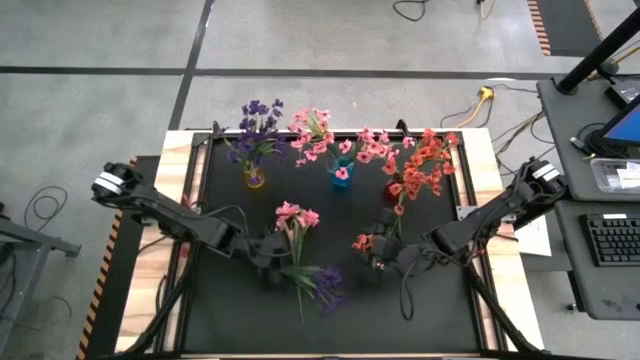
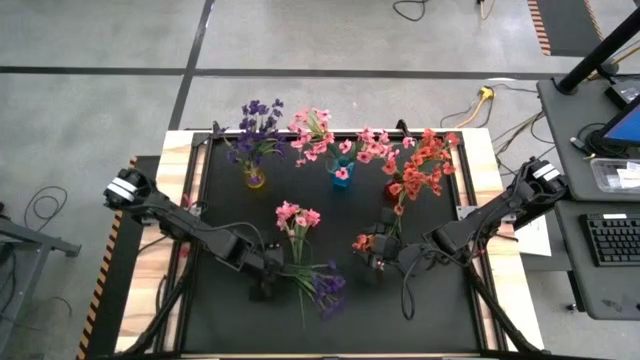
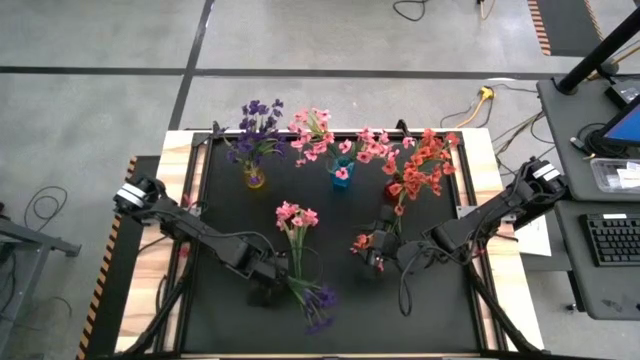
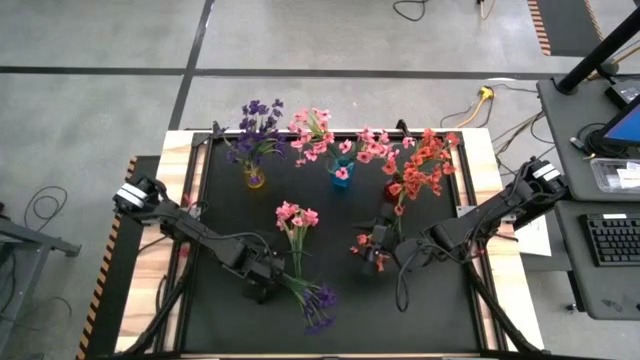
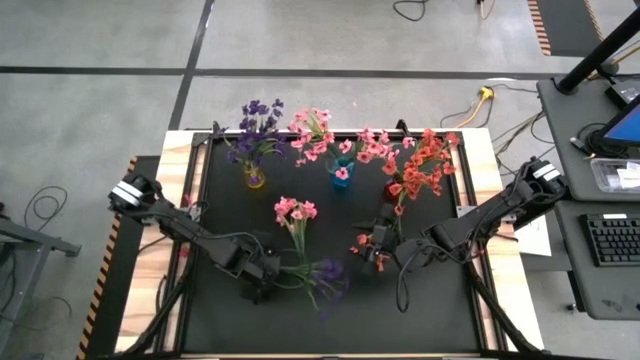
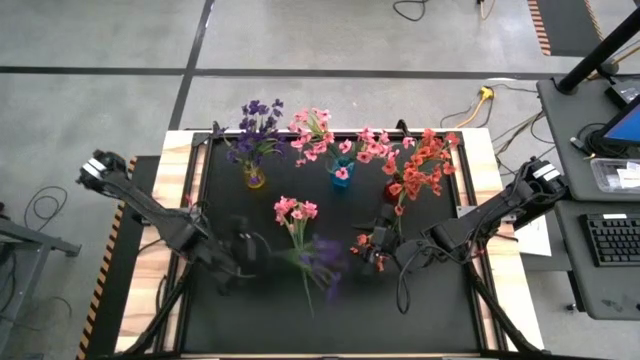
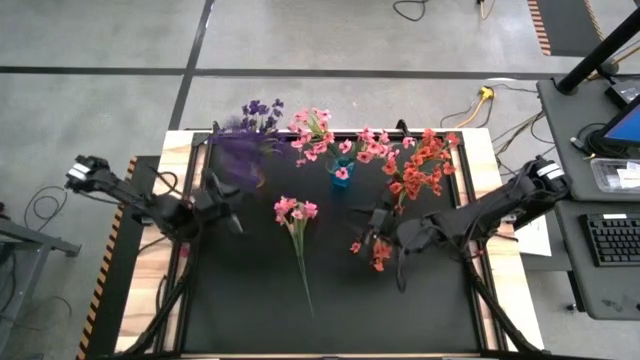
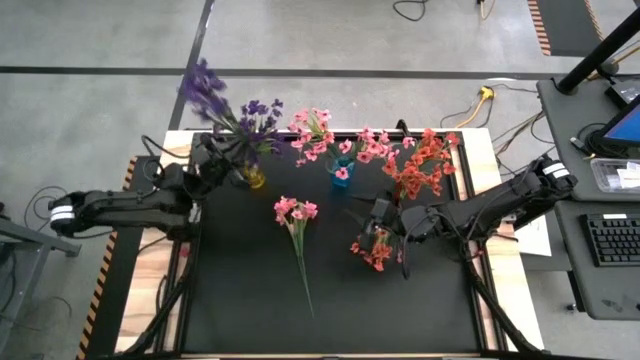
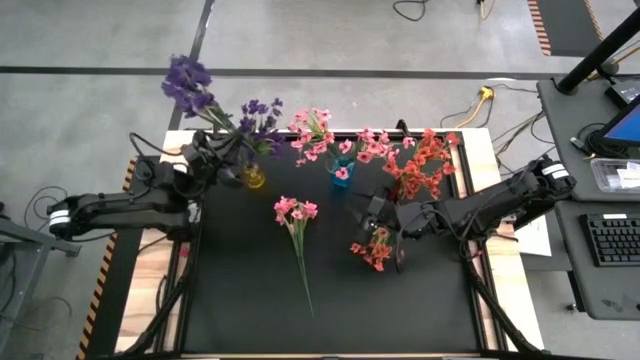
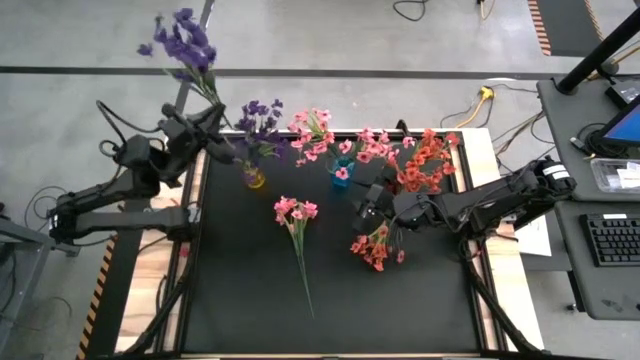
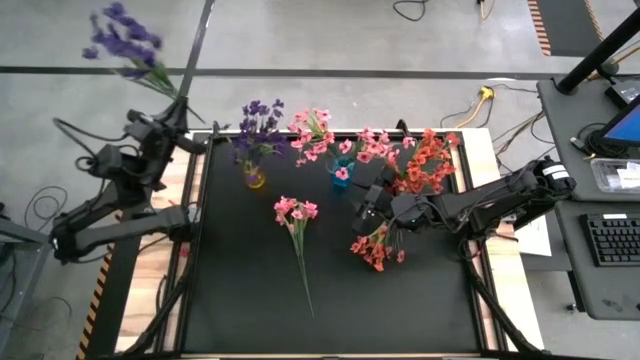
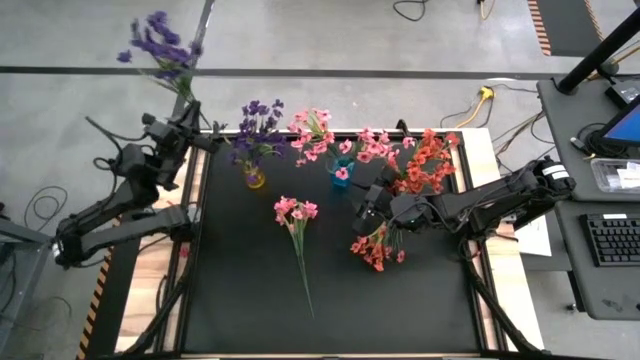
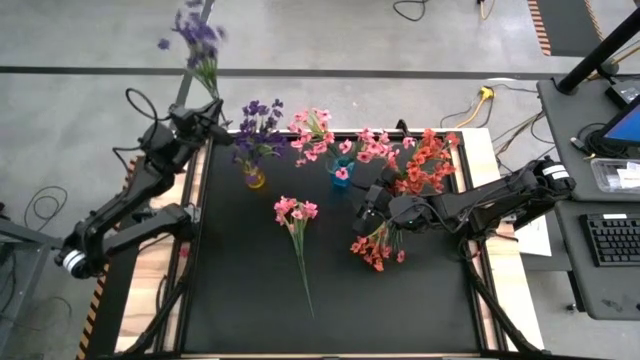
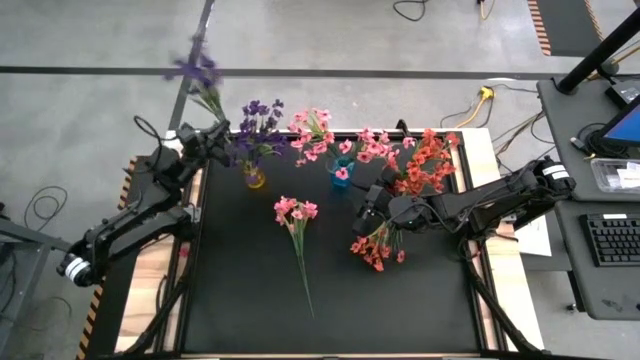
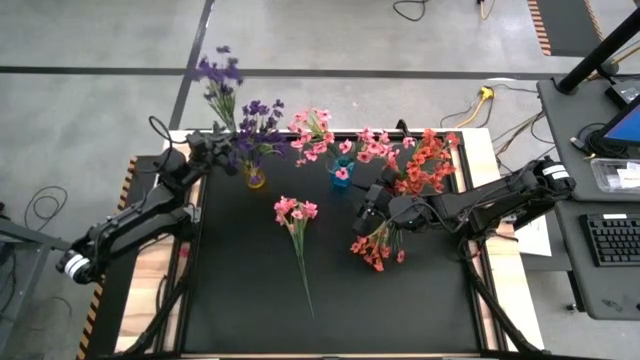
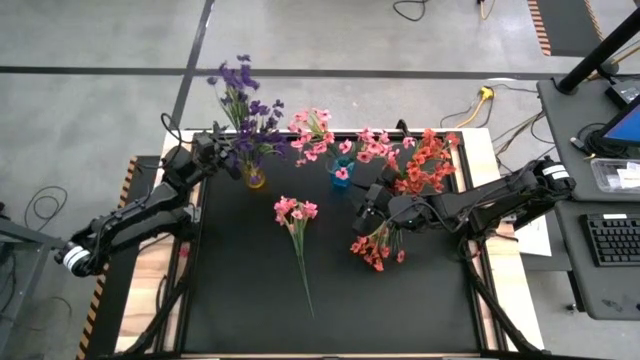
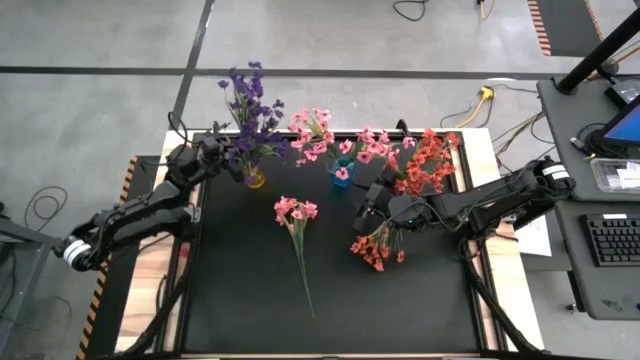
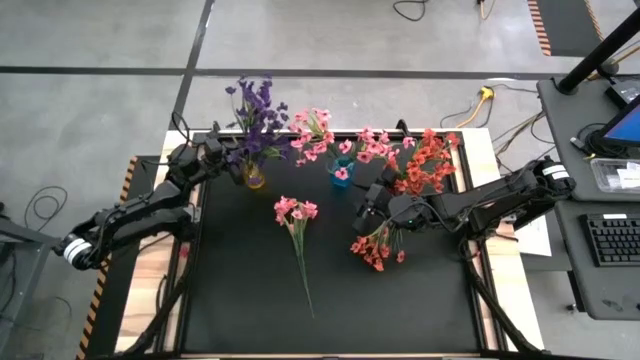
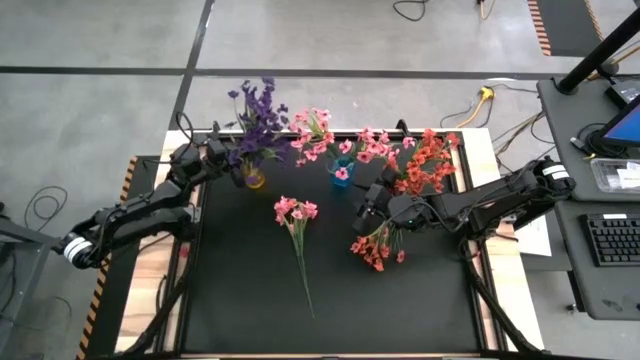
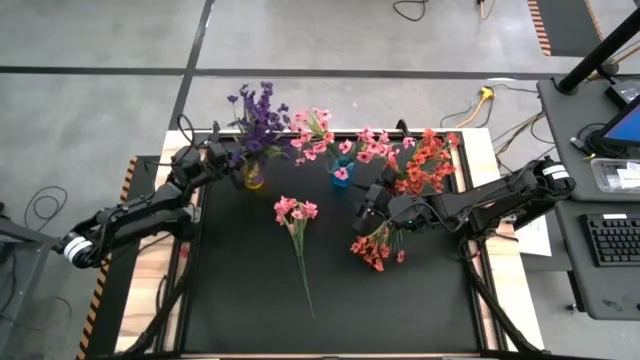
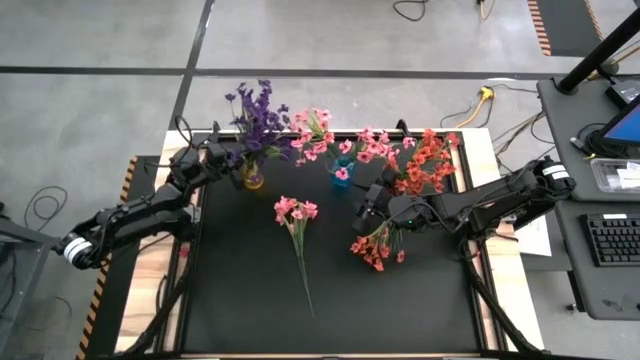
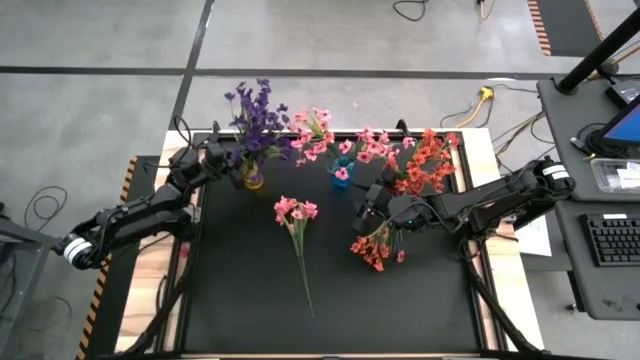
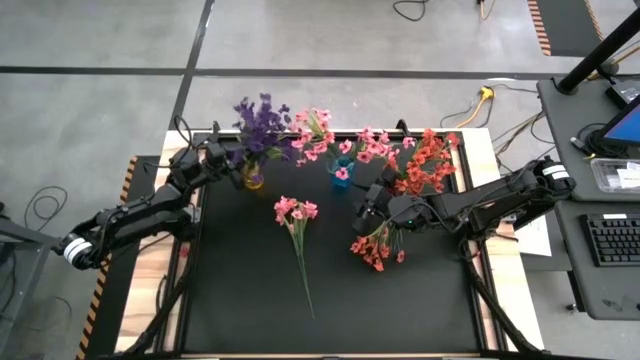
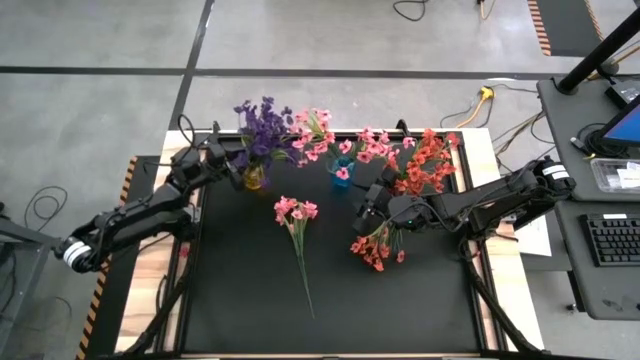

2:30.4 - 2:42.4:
Task: Sort flowers into vase by color
Put the purple flower into the yellow vase

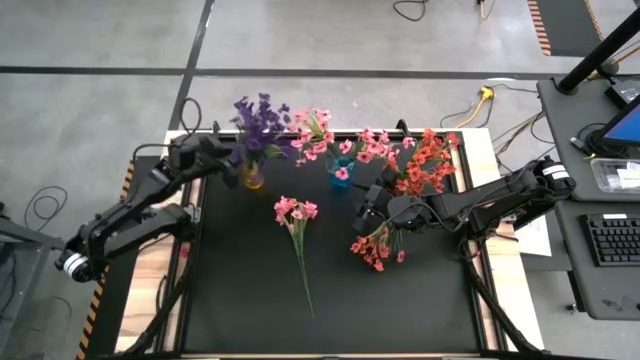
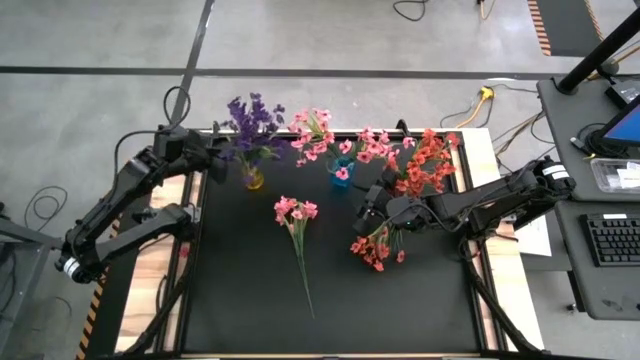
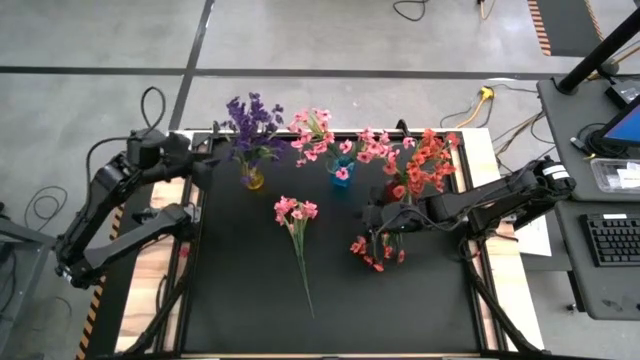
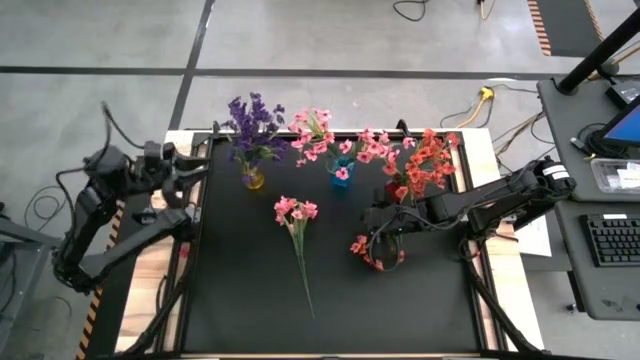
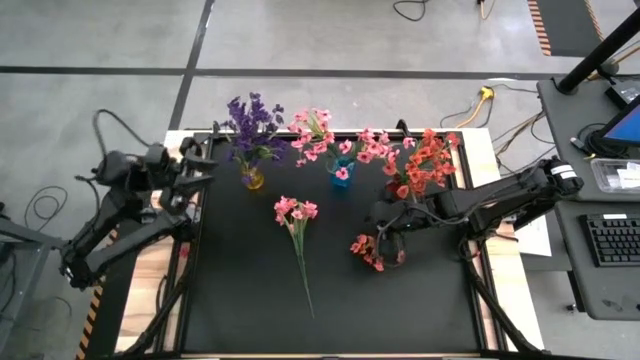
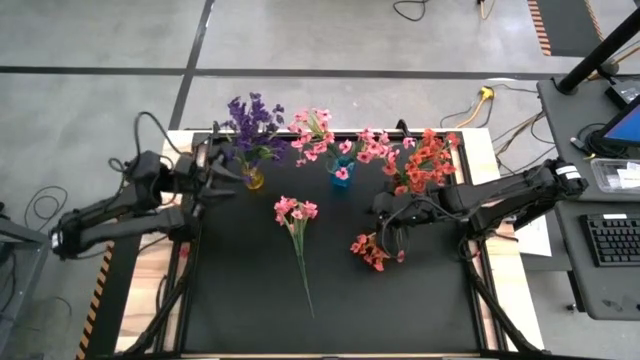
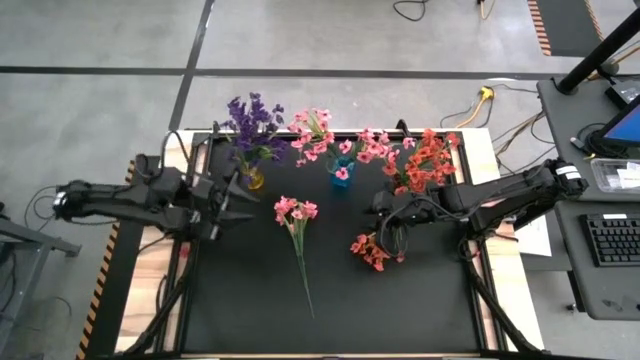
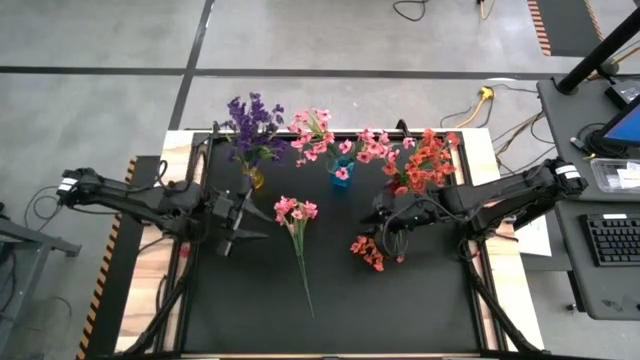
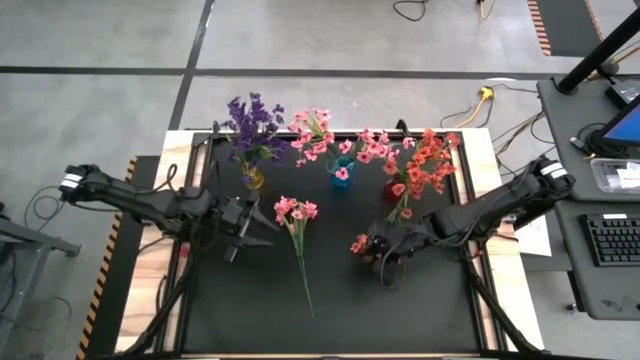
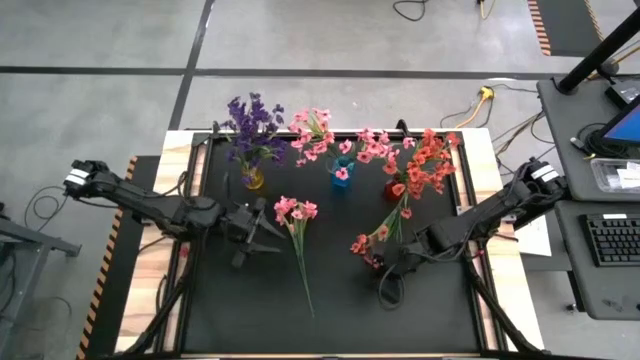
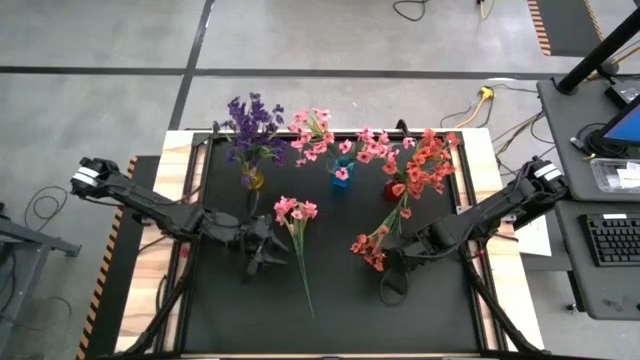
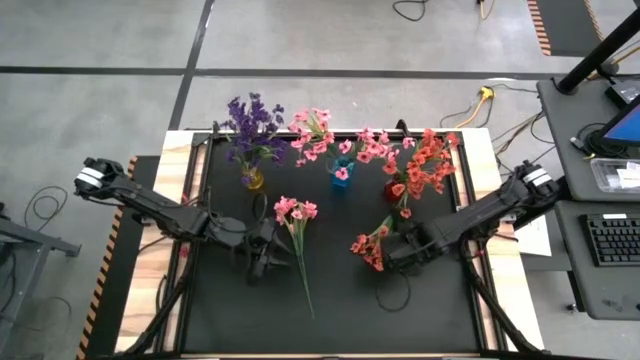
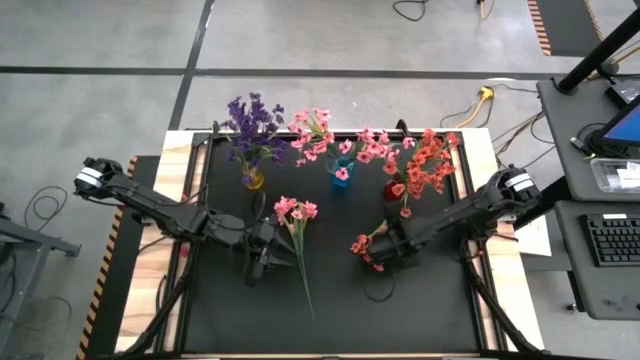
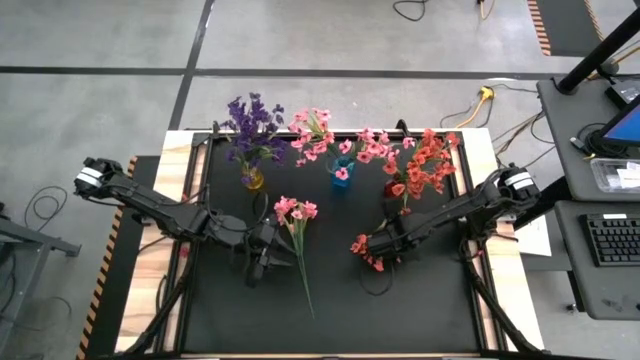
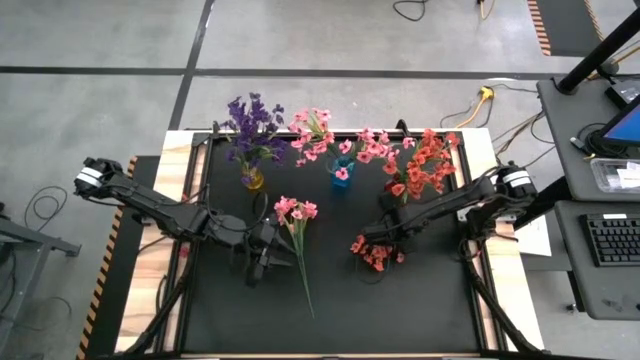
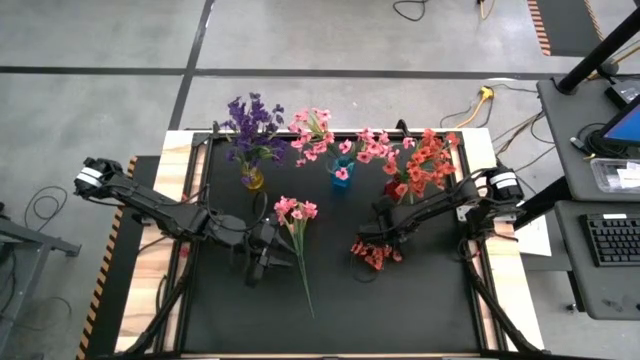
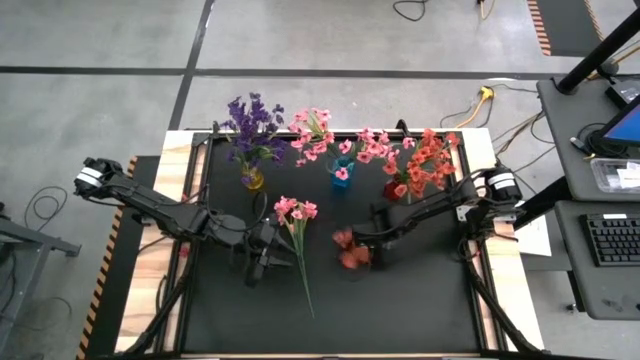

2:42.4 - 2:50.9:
Put the orange flower into the red vase
